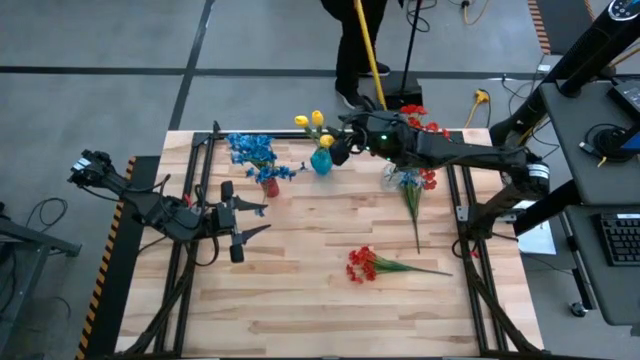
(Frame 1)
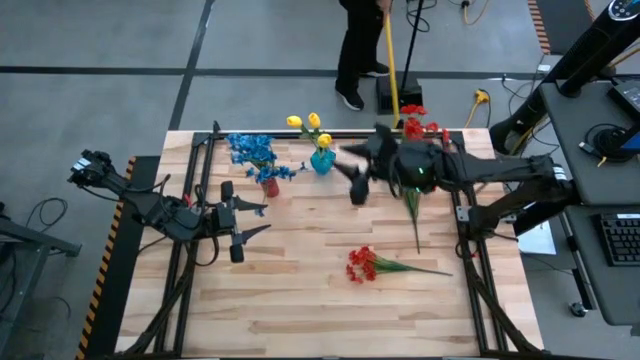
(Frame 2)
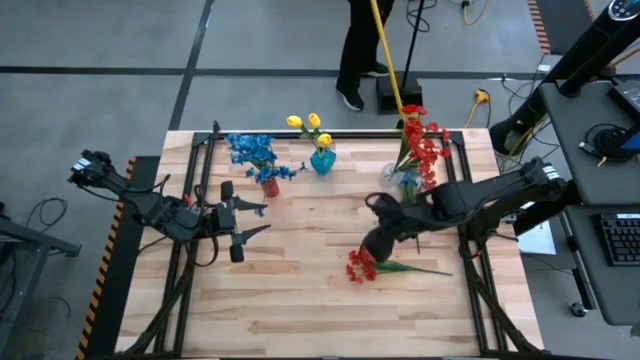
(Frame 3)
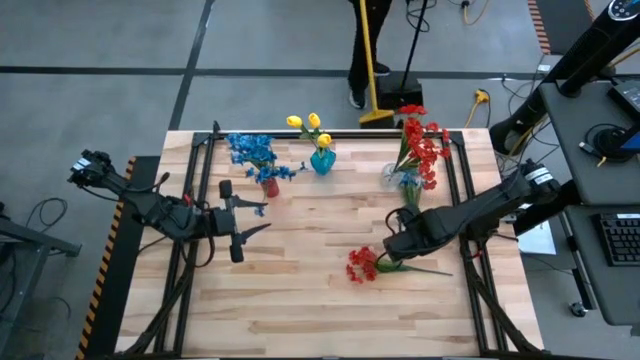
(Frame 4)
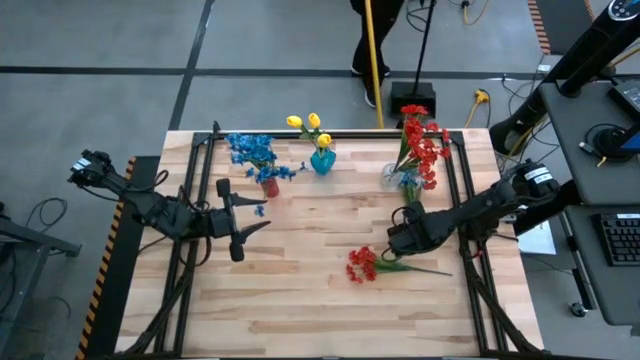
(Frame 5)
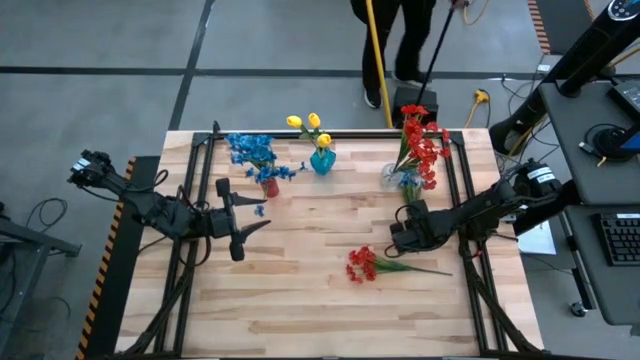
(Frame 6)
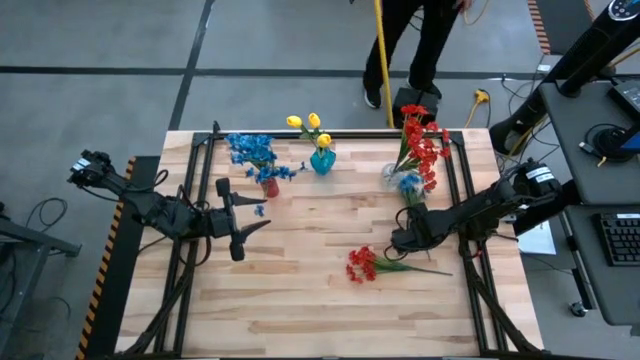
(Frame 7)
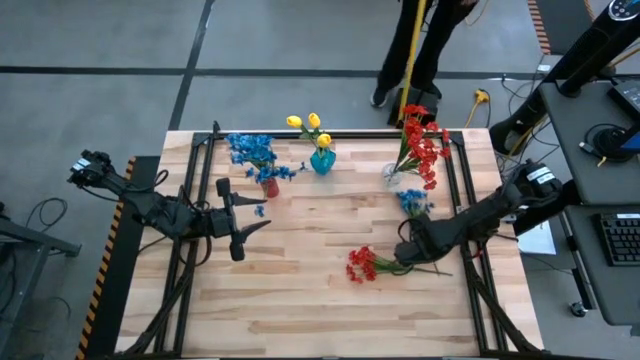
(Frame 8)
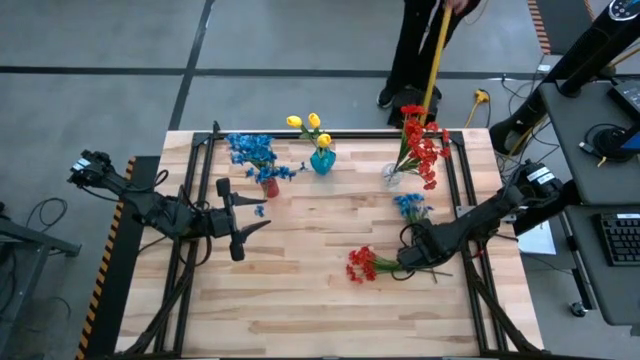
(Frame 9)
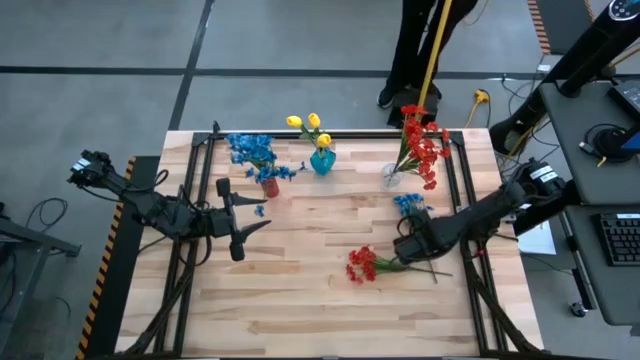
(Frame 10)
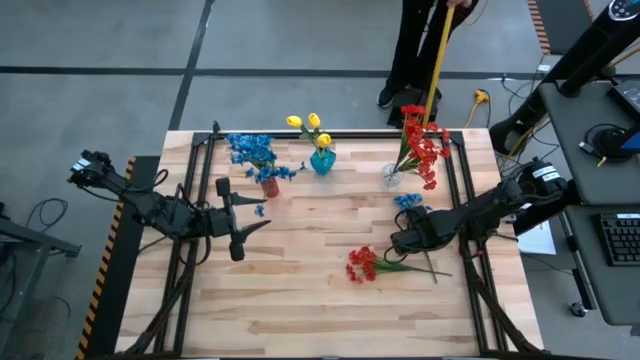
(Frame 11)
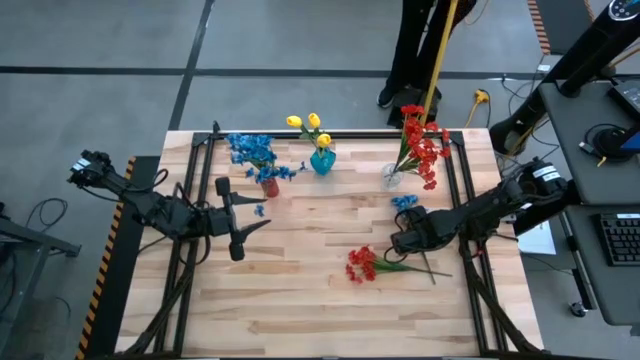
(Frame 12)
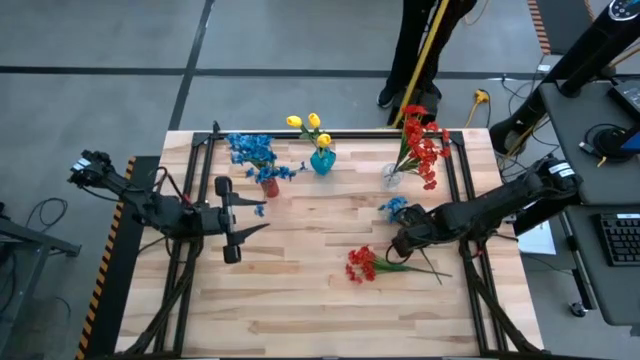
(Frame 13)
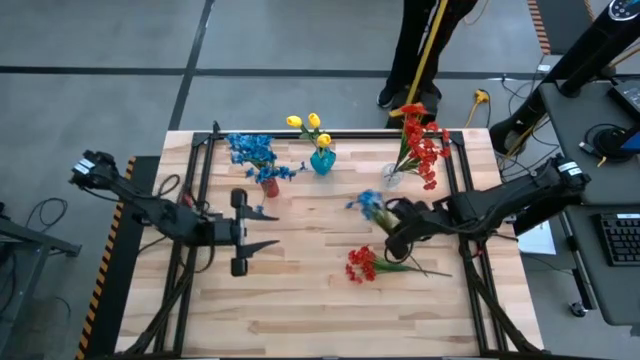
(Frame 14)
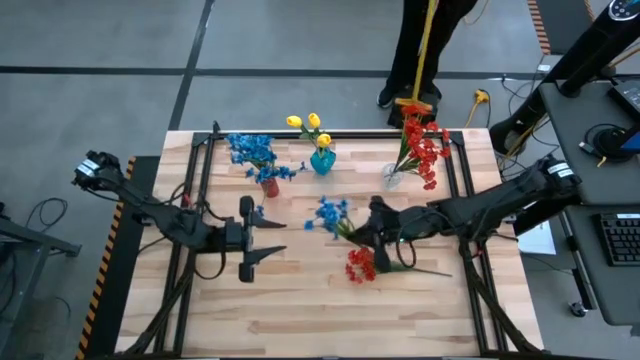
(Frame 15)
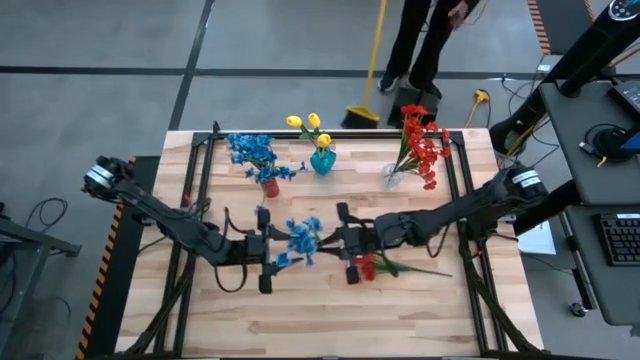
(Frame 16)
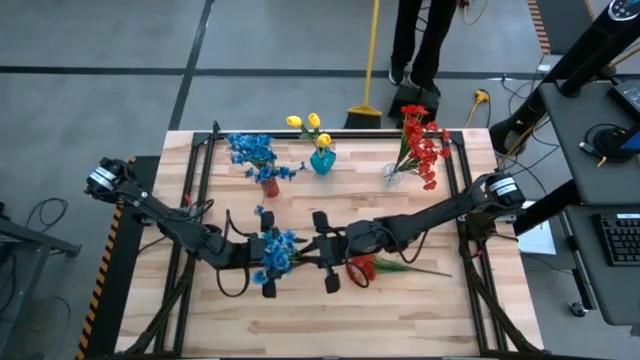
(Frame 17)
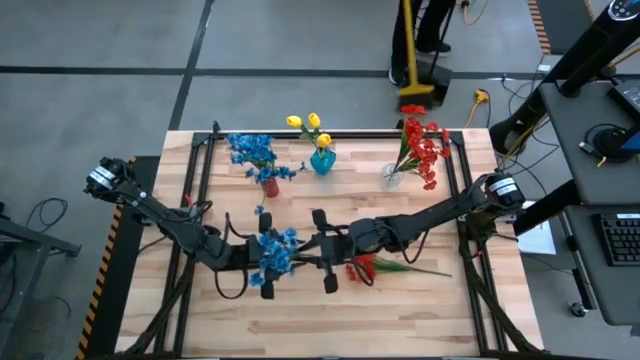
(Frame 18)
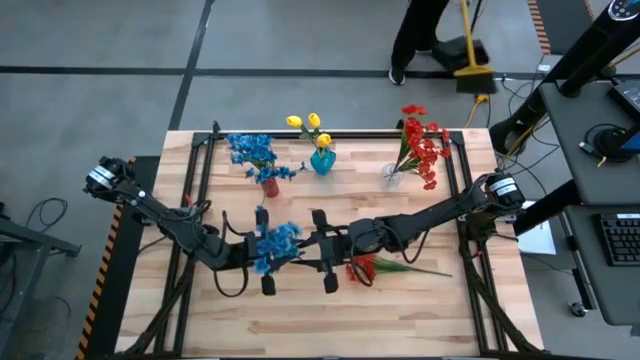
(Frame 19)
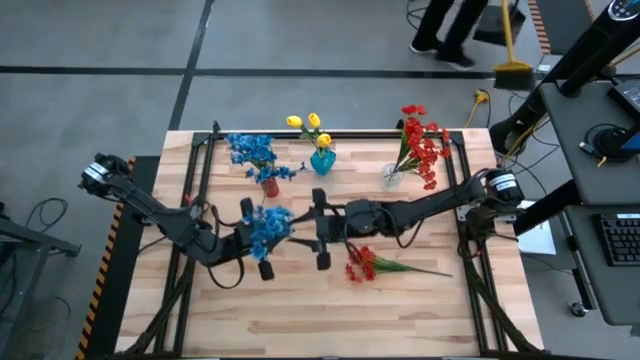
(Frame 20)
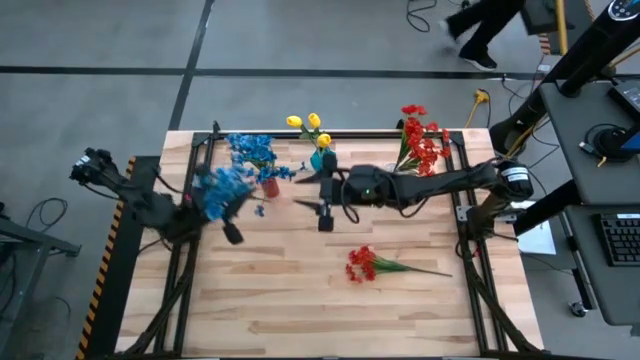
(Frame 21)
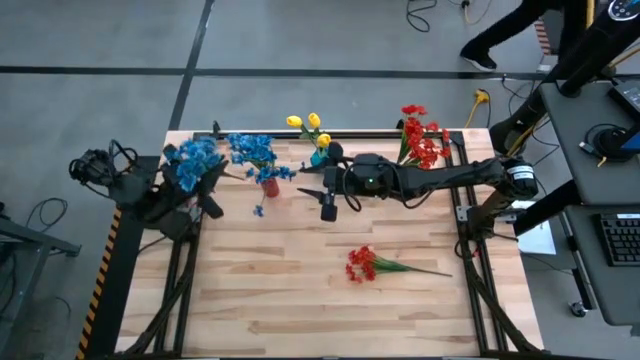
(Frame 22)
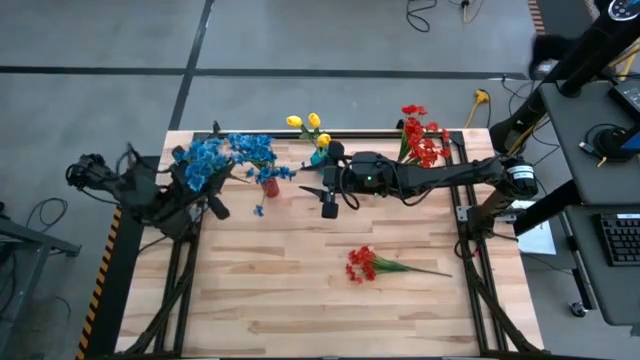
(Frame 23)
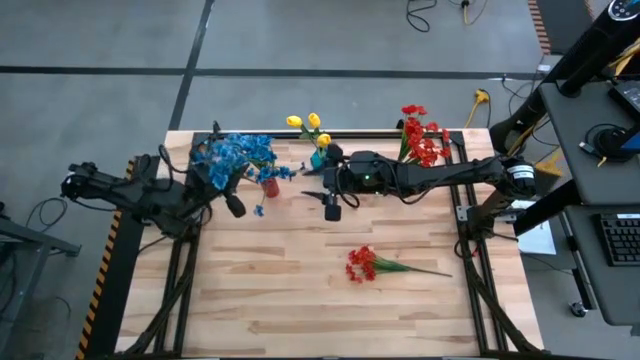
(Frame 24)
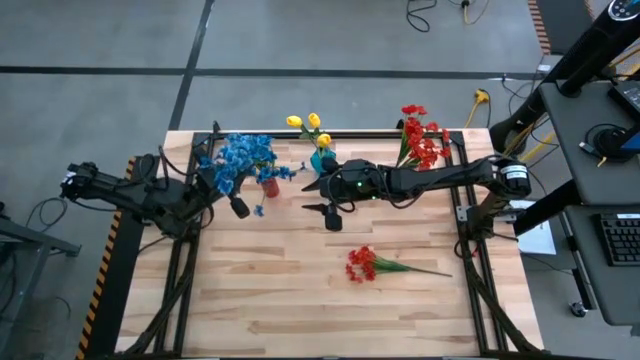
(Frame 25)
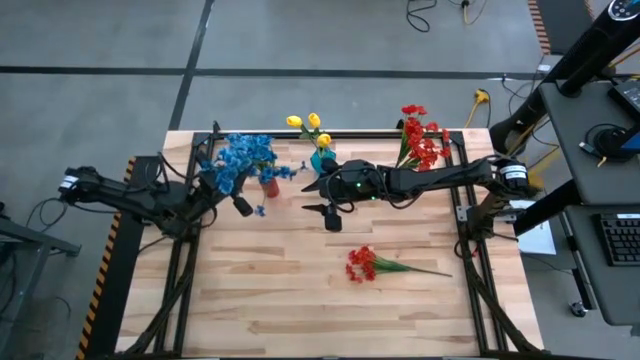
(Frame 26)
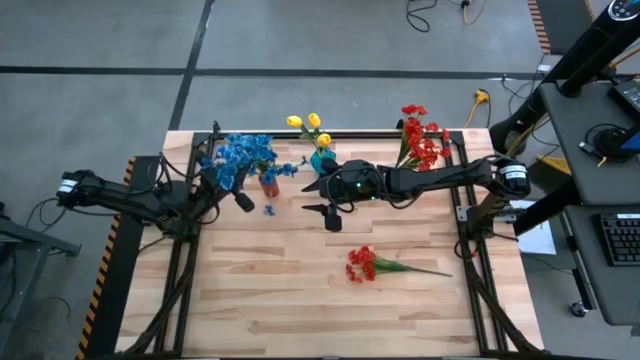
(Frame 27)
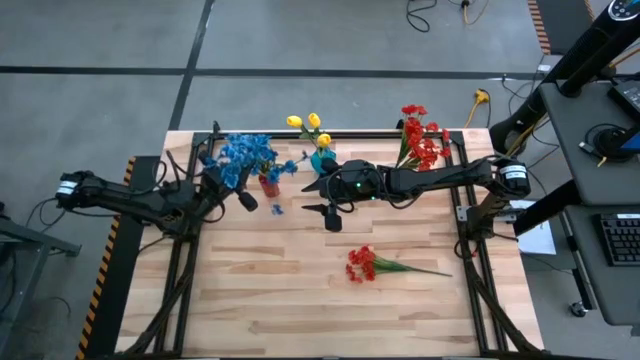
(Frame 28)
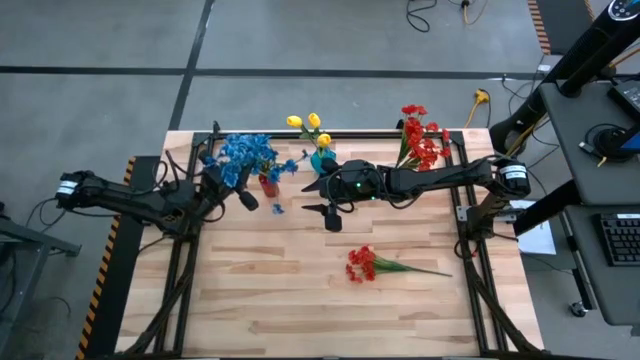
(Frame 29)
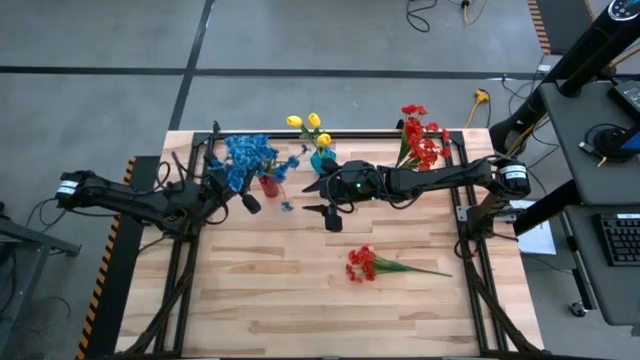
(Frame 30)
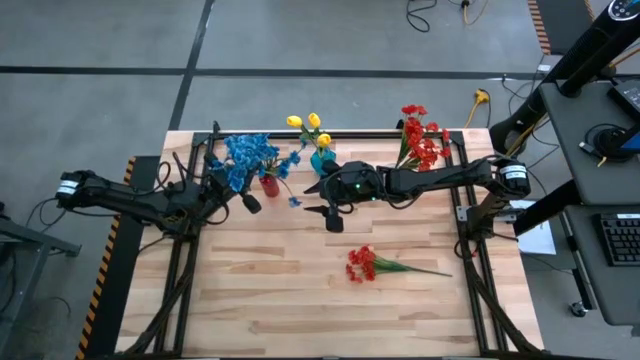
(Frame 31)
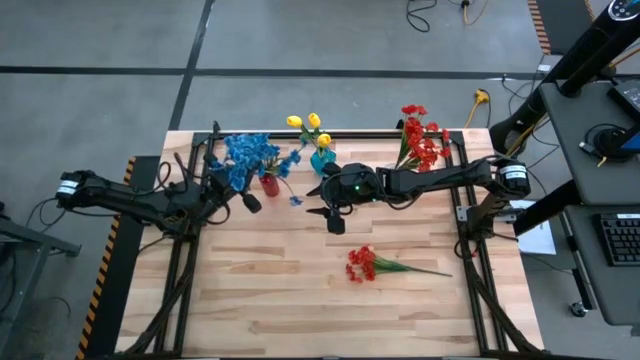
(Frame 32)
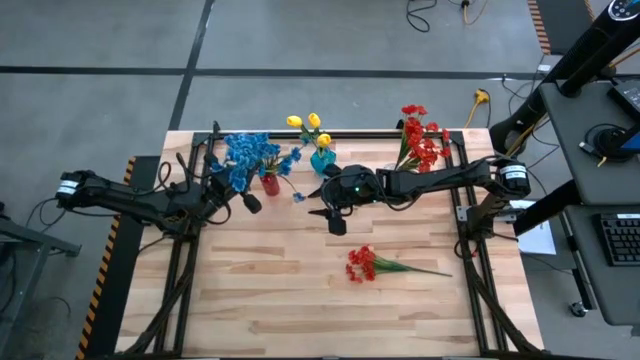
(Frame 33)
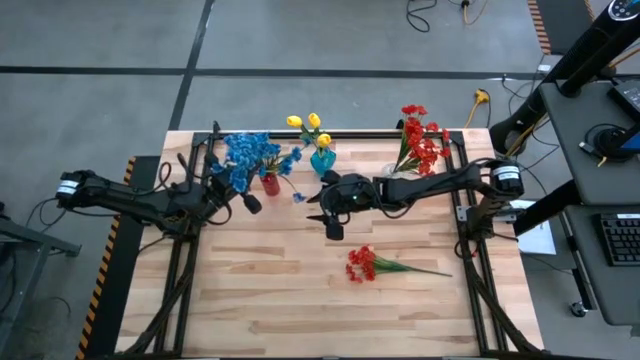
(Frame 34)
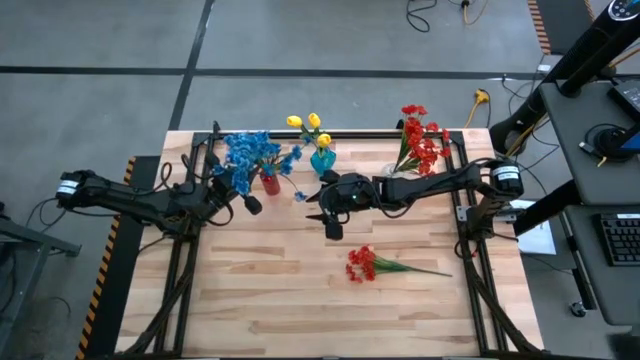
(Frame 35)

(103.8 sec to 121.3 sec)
Task: Sort flowers into vase by color
Put the blue flower into the red vase
